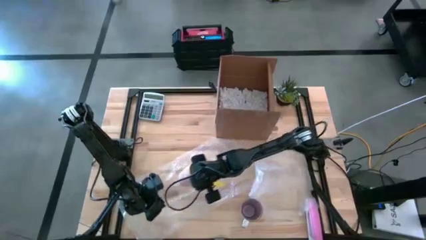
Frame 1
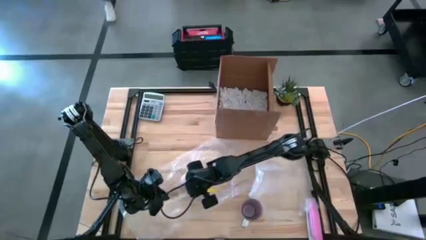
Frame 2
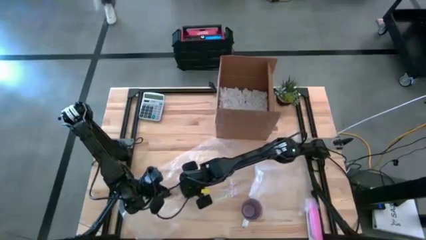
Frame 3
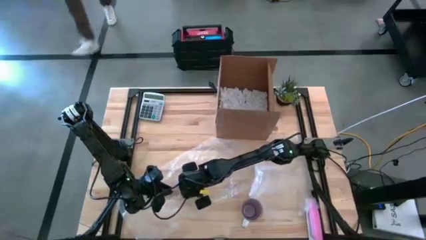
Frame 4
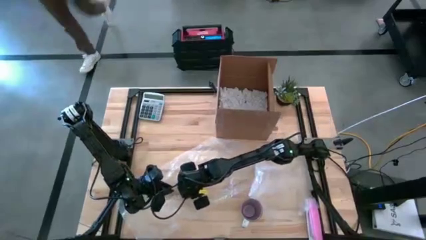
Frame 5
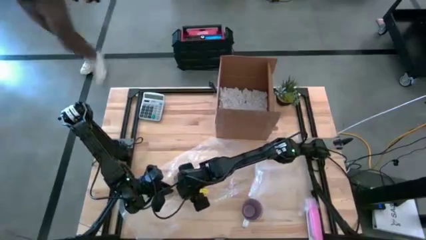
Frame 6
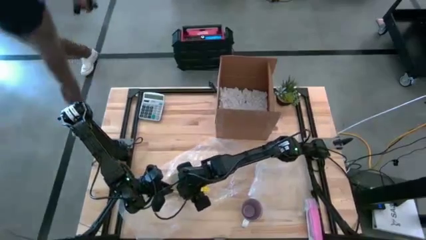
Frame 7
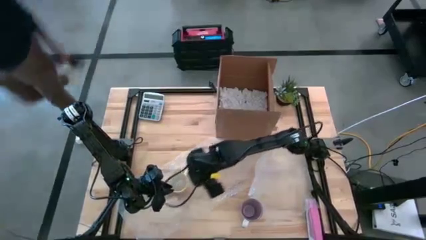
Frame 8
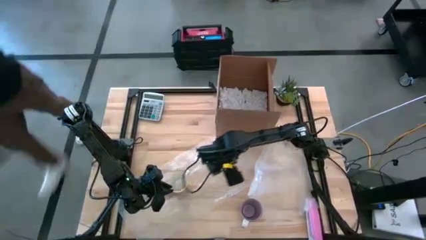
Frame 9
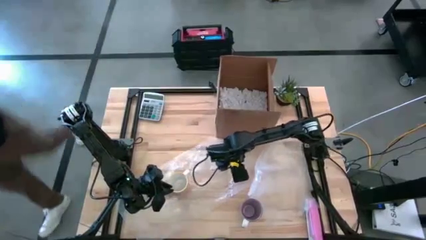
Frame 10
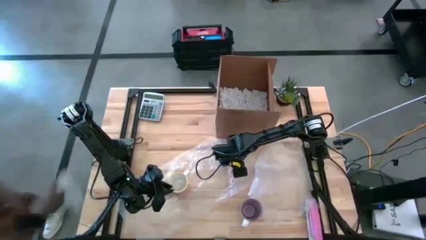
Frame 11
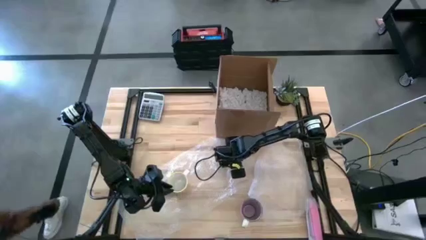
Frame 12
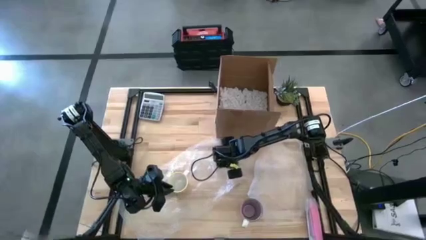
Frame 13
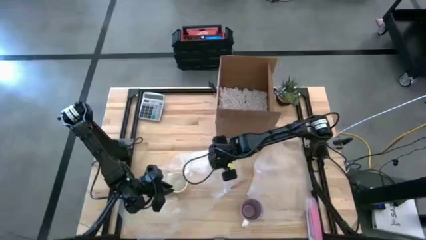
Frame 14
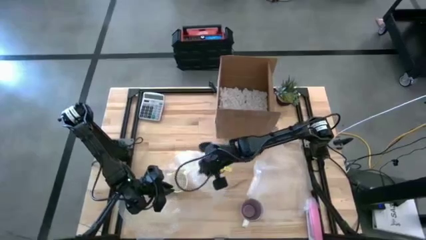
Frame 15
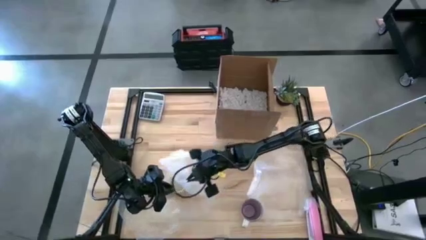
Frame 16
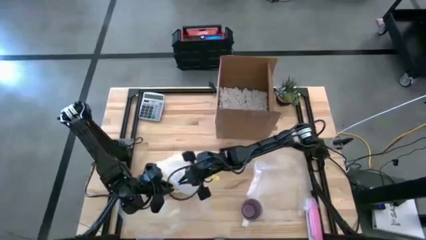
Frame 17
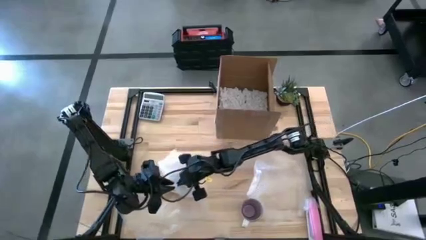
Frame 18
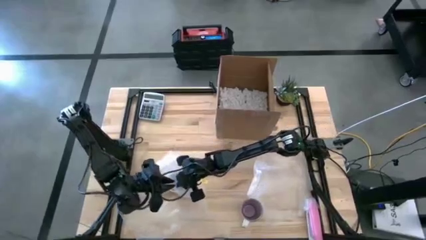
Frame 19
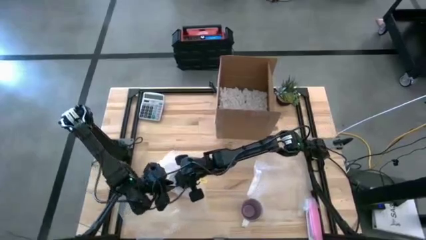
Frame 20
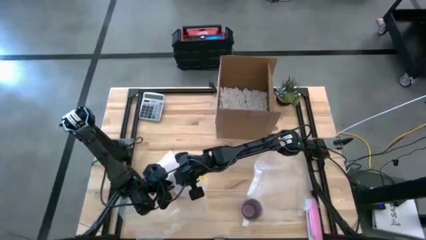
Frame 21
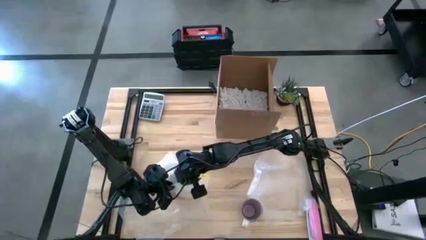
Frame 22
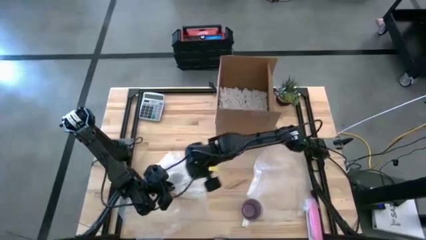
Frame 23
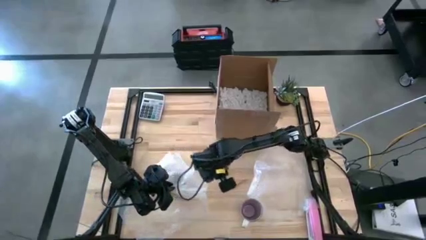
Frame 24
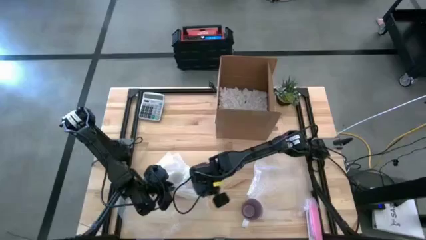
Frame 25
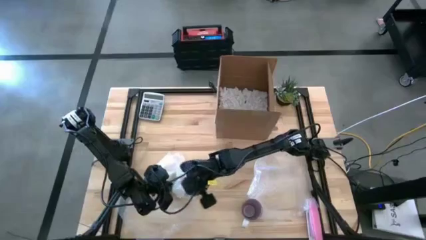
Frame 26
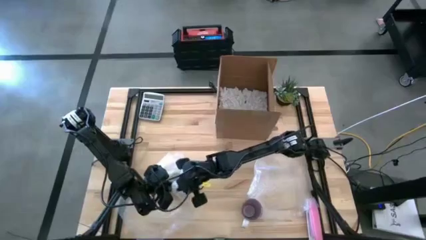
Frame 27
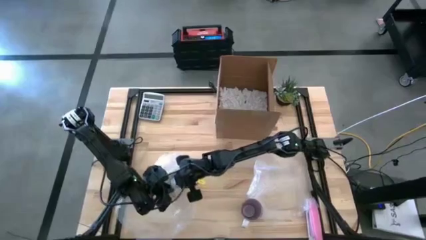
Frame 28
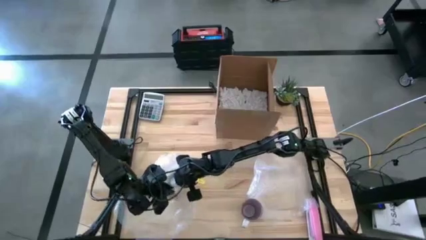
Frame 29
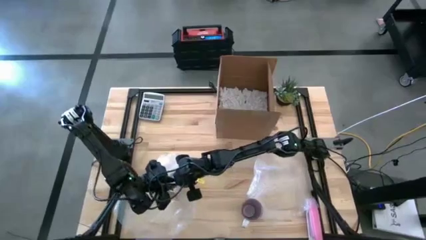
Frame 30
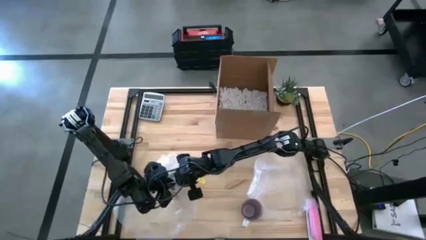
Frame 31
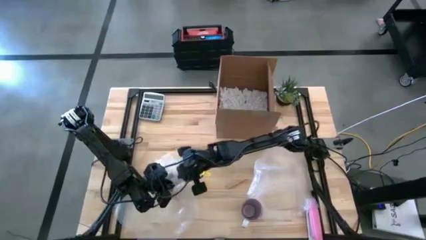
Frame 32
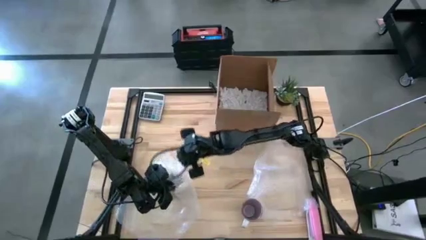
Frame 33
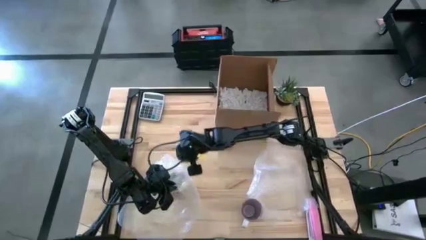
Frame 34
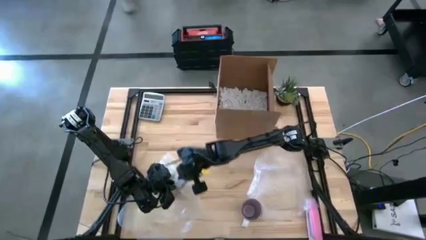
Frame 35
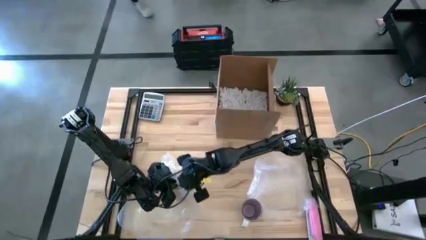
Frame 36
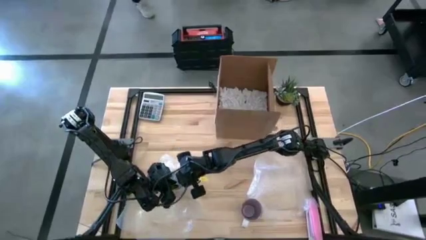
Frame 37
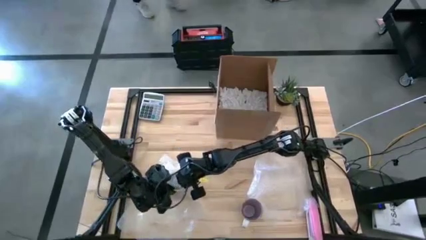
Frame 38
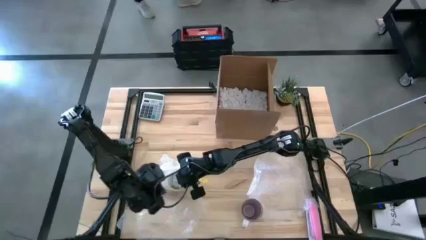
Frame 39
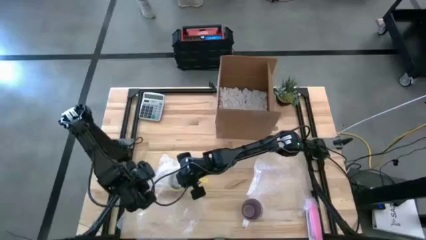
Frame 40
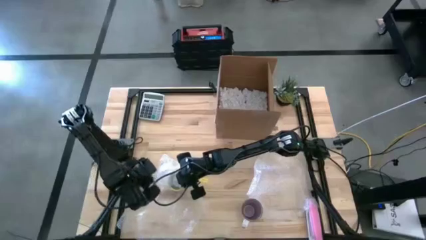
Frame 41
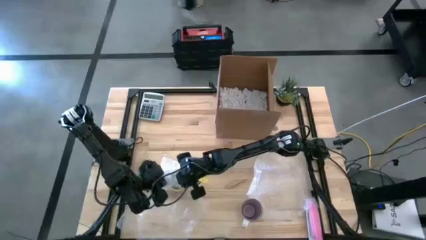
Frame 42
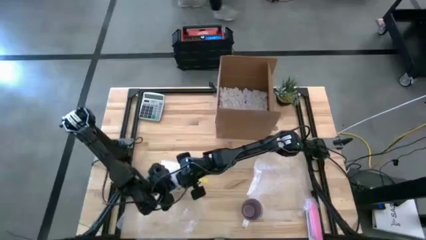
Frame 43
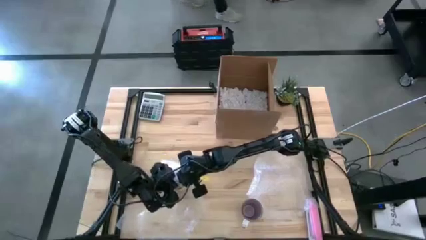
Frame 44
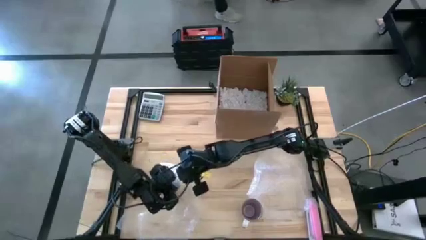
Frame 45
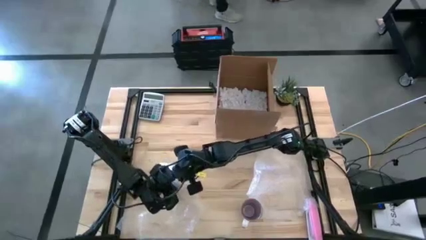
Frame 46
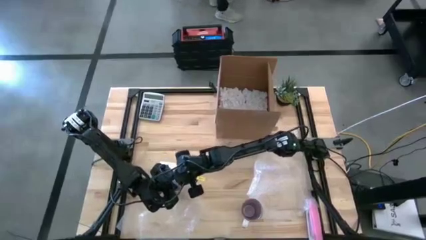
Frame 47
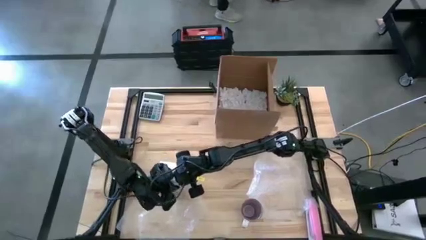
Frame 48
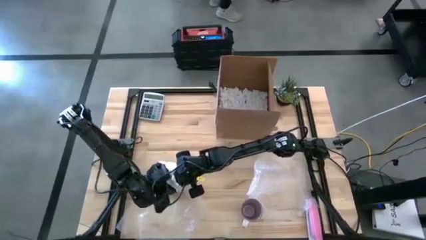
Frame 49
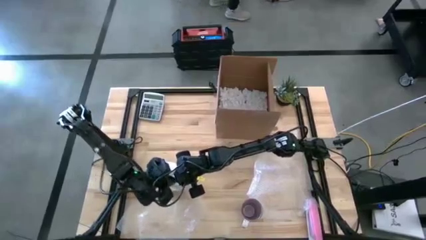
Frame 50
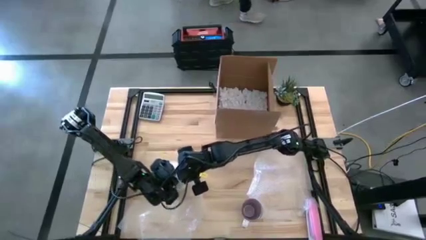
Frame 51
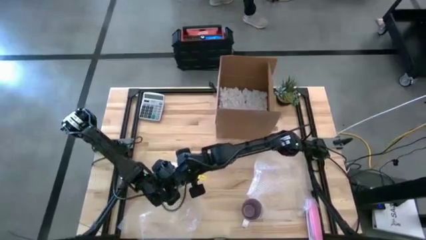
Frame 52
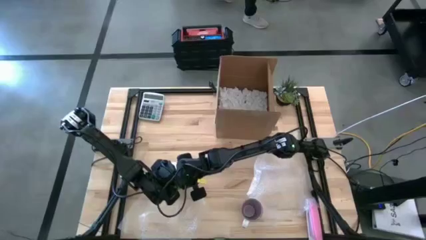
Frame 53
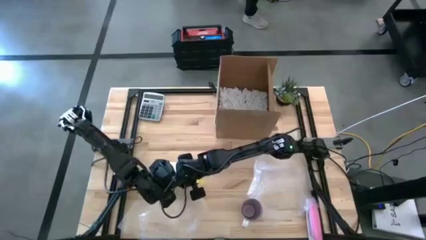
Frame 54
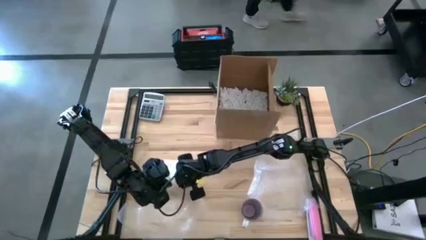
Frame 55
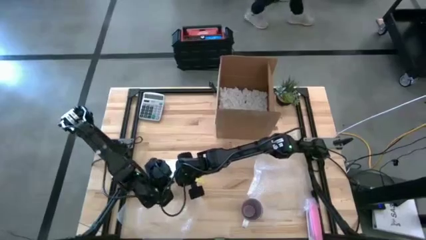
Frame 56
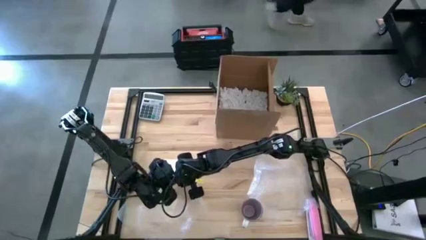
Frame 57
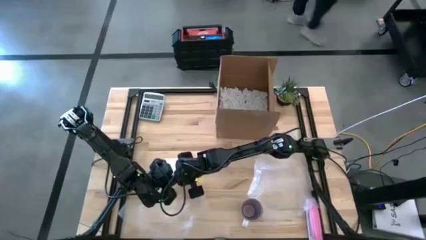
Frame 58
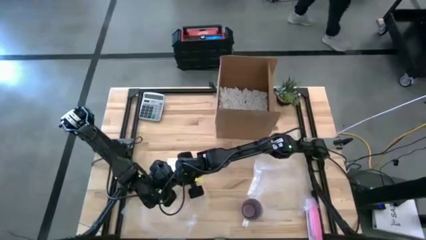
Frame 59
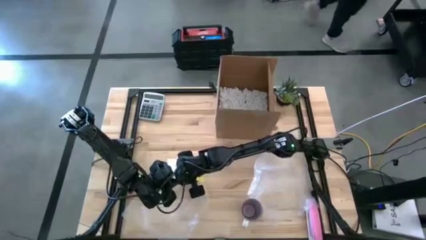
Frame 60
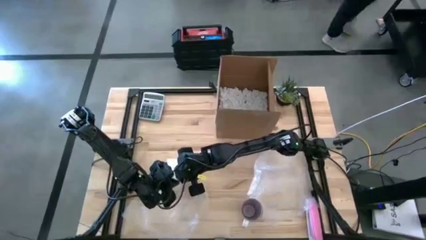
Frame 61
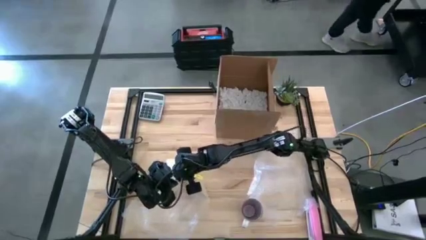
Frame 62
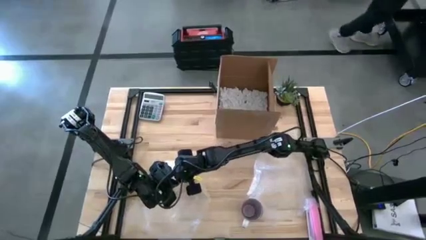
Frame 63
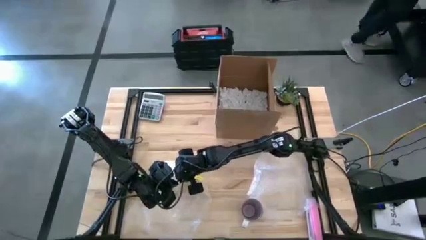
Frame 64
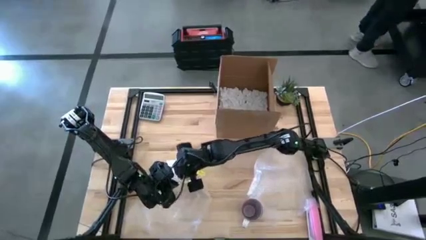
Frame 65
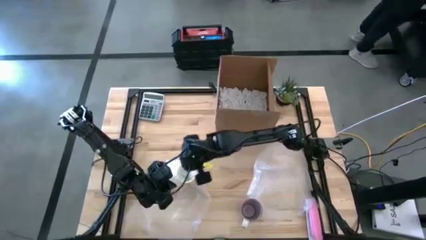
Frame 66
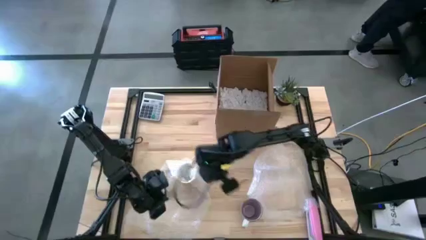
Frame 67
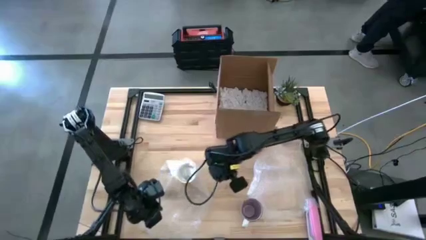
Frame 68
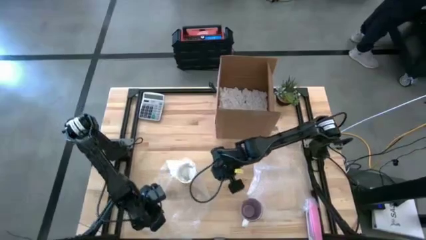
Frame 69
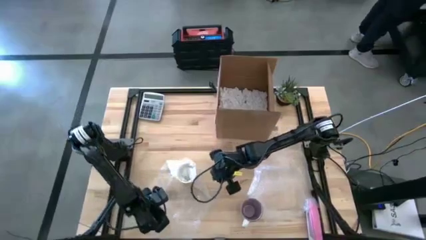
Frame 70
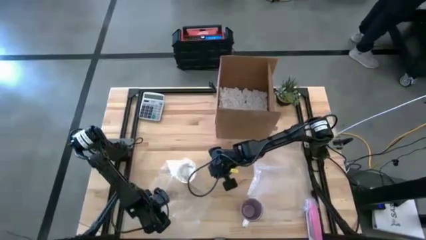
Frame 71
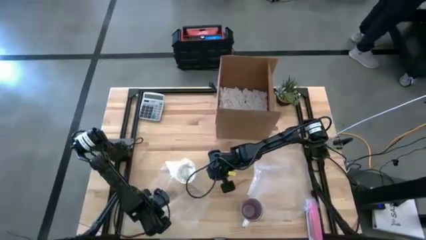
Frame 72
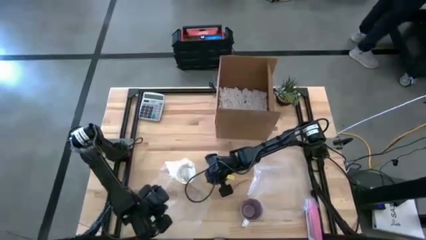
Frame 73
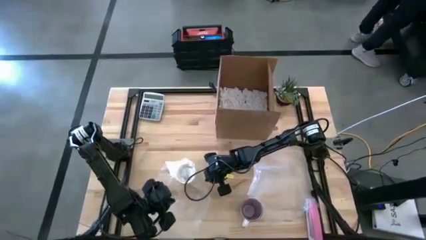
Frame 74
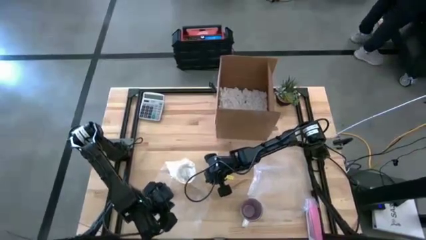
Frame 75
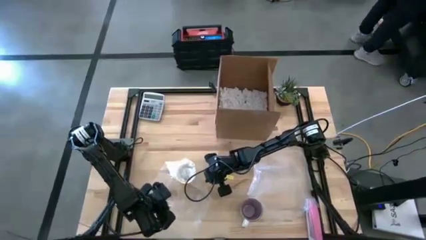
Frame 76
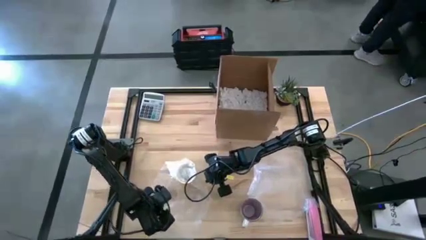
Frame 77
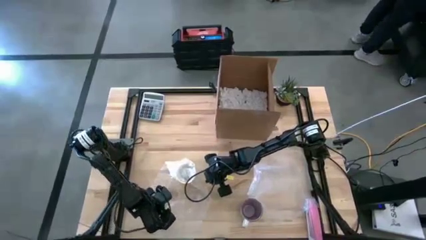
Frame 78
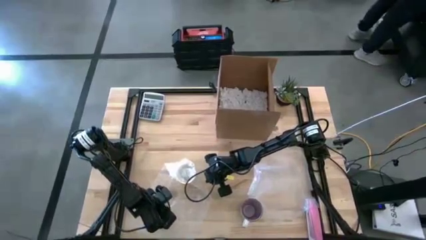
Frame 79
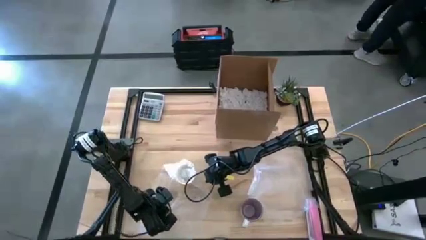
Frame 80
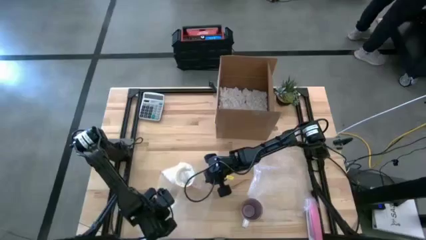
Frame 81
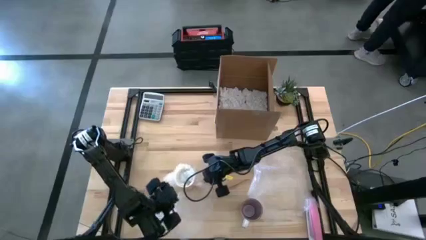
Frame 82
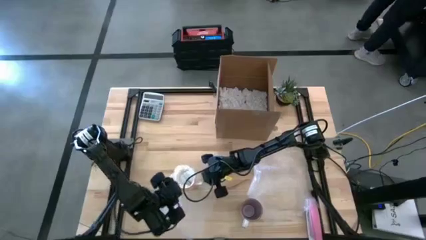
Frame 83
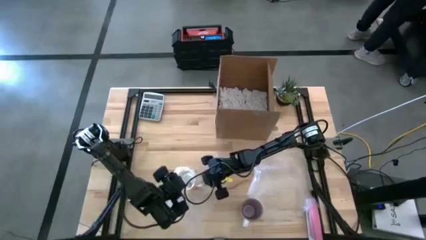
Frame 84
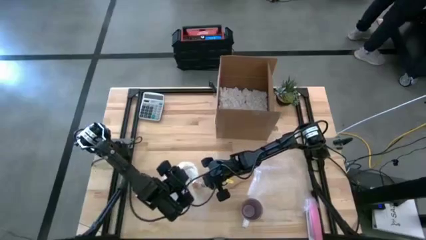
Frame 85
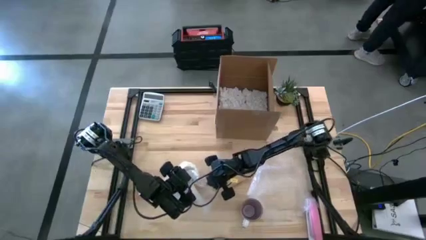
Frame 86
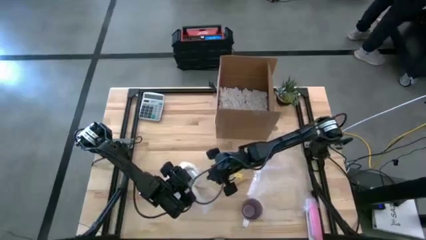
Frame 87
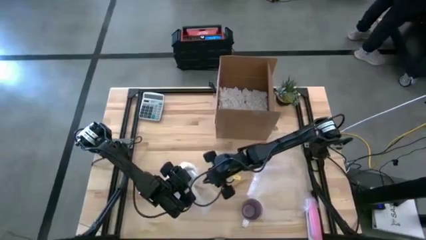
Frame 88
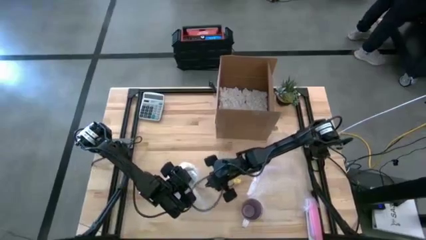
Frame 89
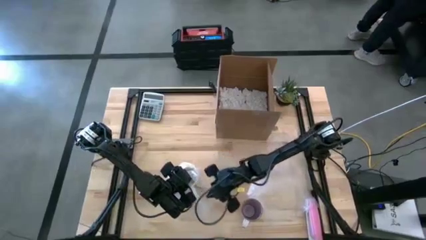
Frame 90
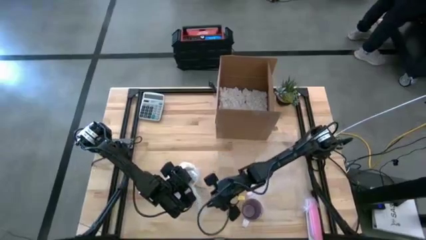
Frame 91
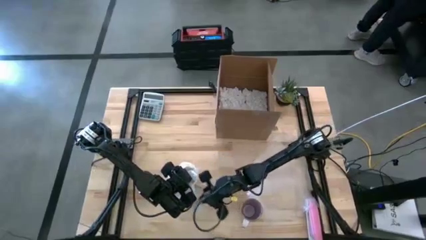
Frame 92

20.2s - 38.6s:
Task: wrap mug
Wrap the orange patterned mug with the left transparent bubble wrap
